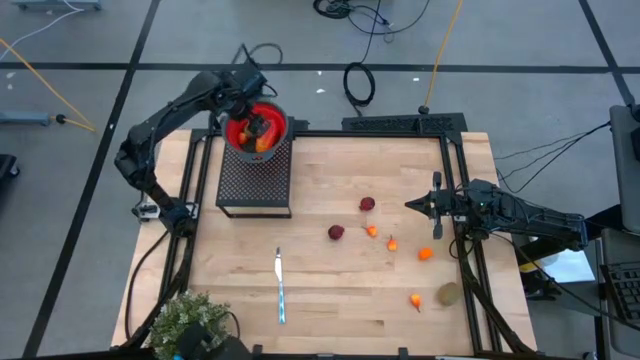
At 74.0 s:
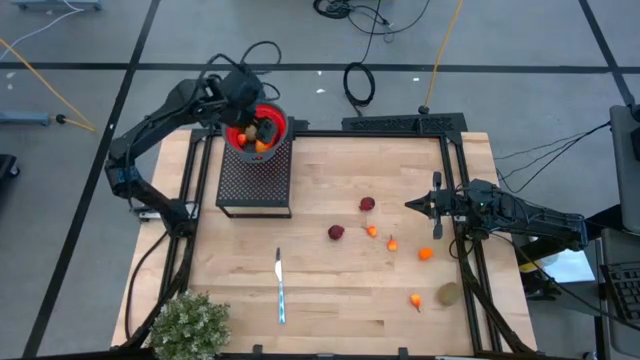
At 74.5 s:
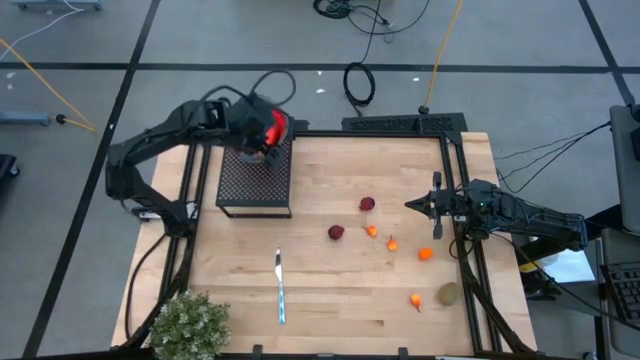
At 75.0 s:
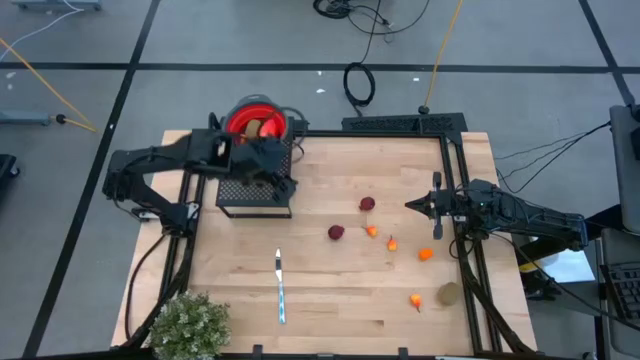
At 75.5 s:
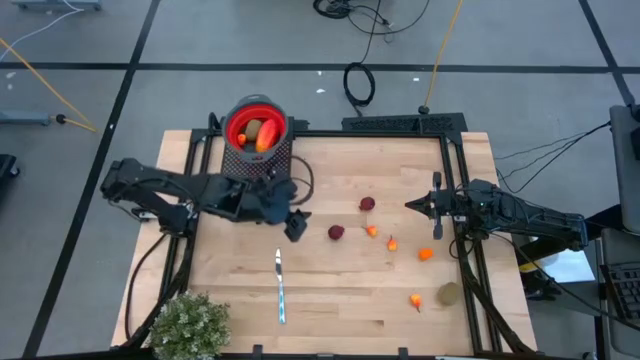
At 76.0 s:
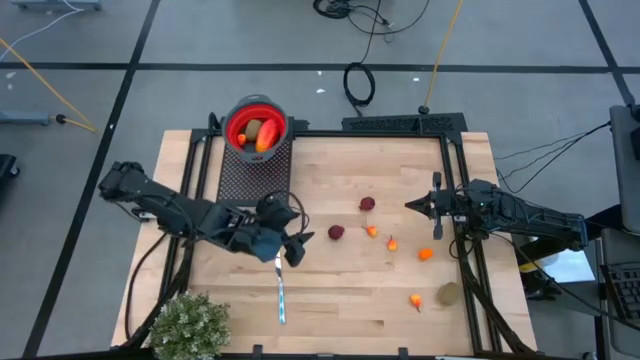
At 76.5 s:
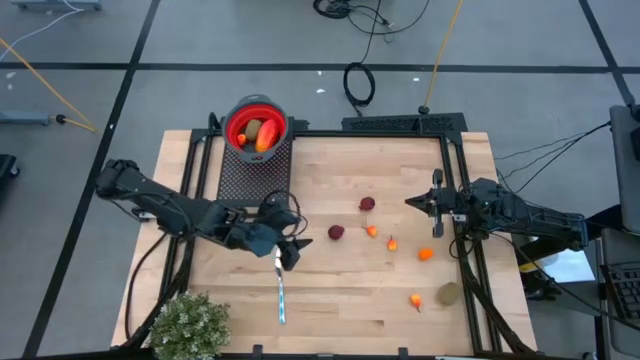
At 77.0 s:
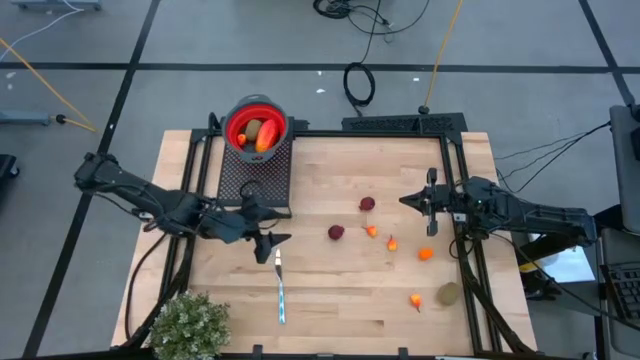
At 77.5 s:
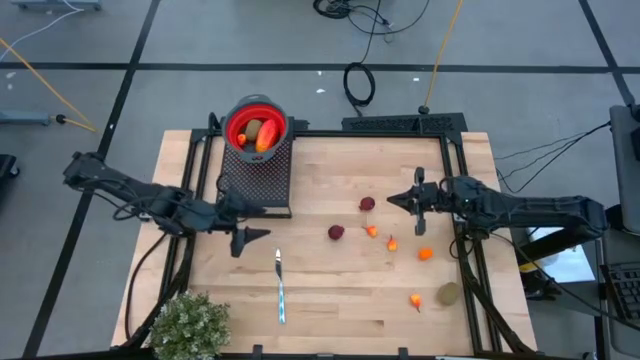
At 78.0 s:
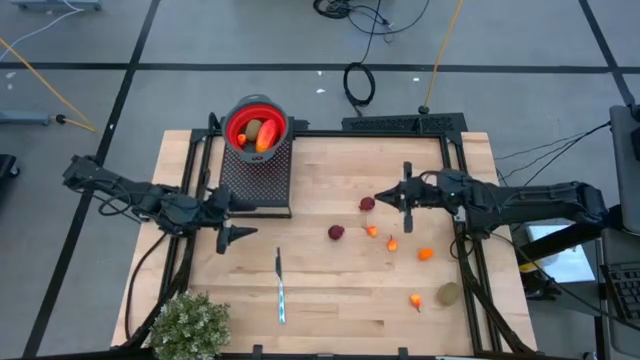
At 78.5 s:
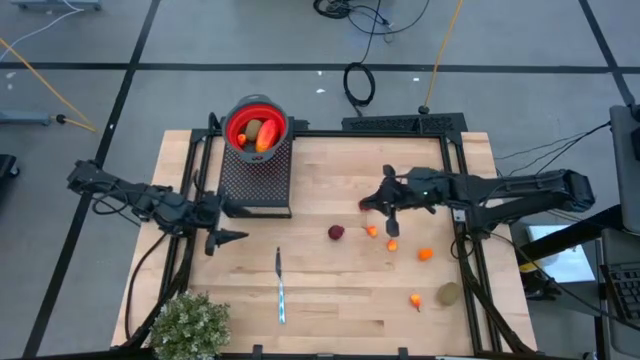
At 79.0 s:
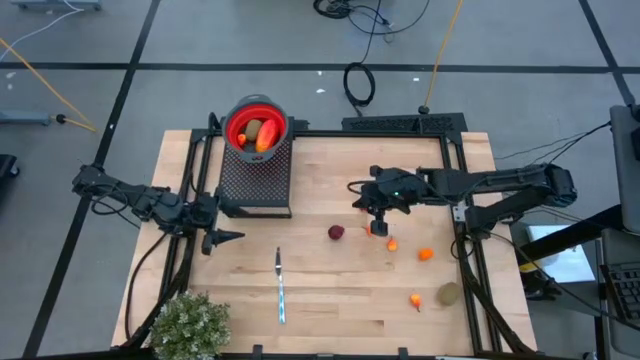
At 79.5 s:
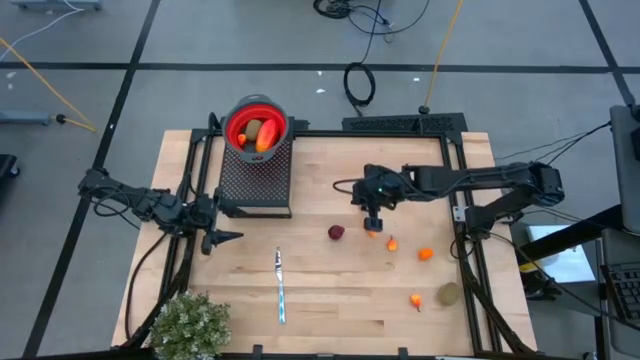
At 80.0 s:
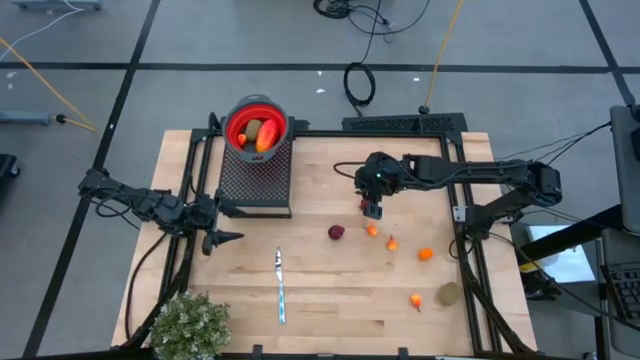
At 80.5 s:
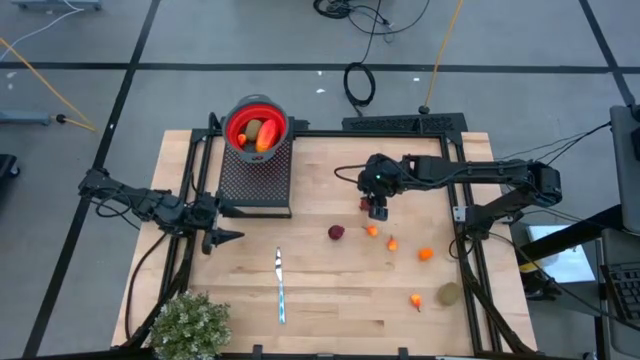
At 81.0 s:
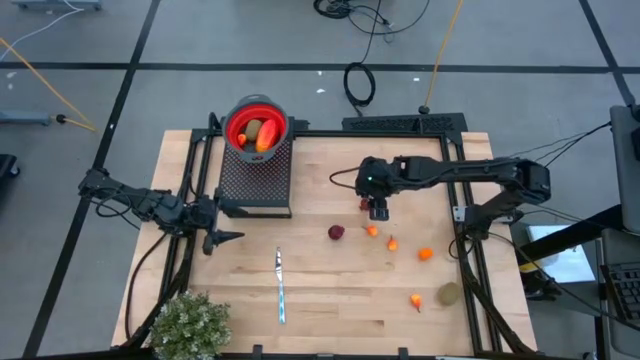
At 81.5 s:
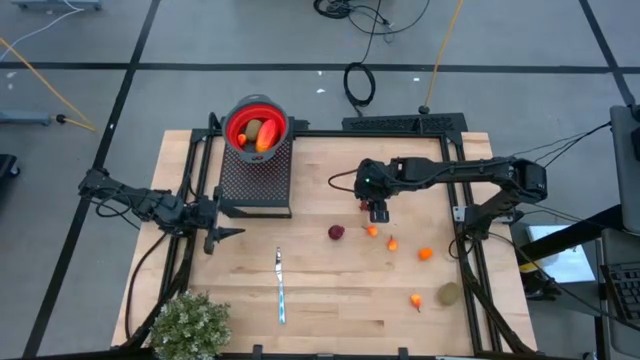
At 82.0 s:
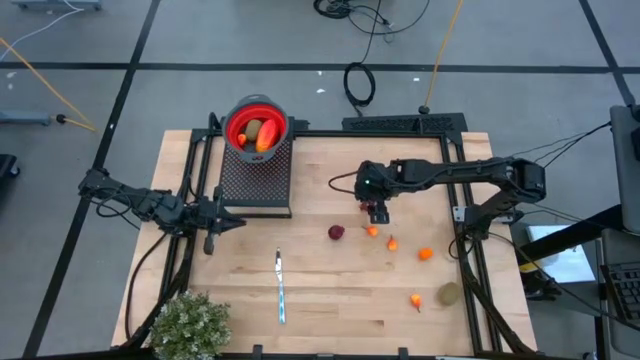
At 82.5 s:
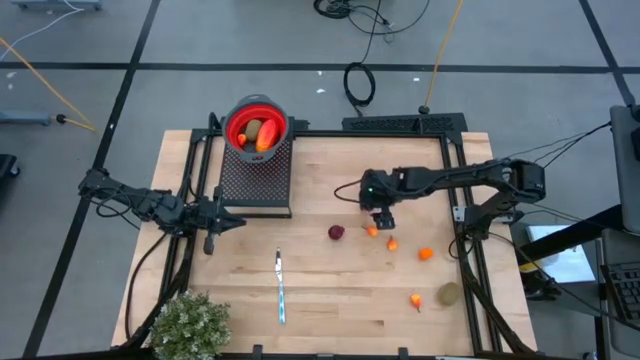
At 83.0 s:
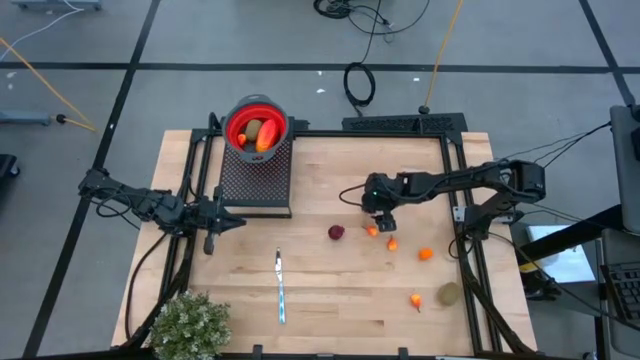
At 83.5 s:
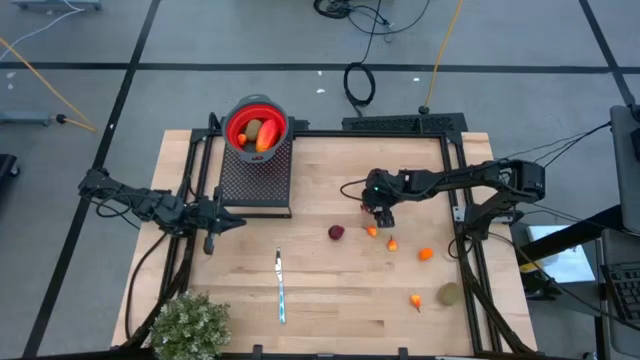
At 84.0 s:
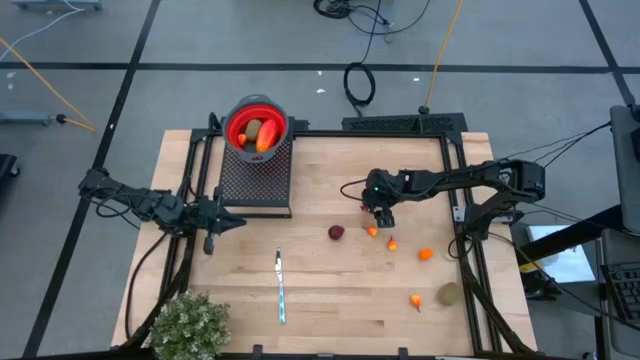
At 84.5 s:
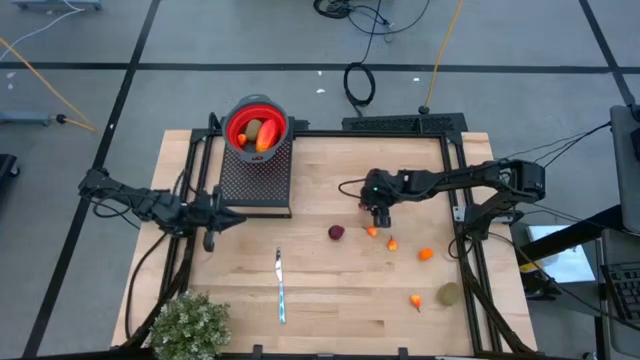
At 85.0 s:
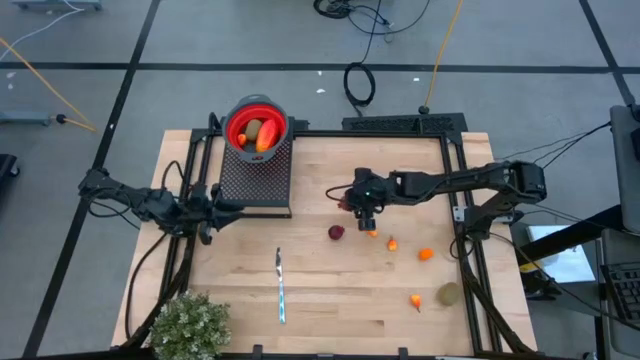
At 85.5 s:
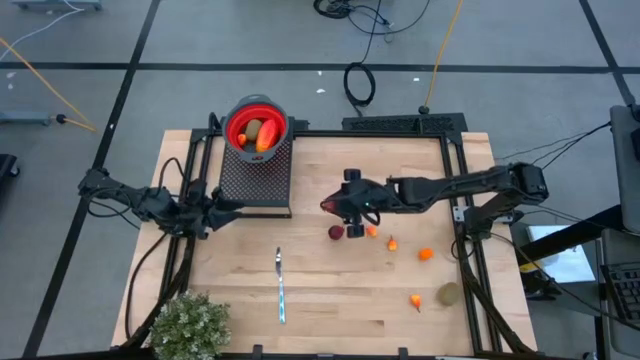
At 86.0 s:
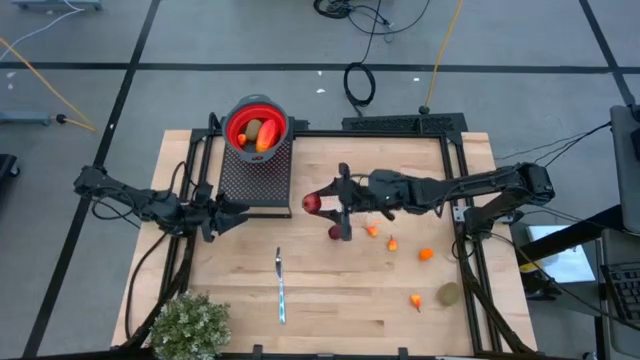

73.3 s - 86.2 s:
Task: Pick & Place Fruit
Put the pomegranate into the red strainer bowl on the shelf

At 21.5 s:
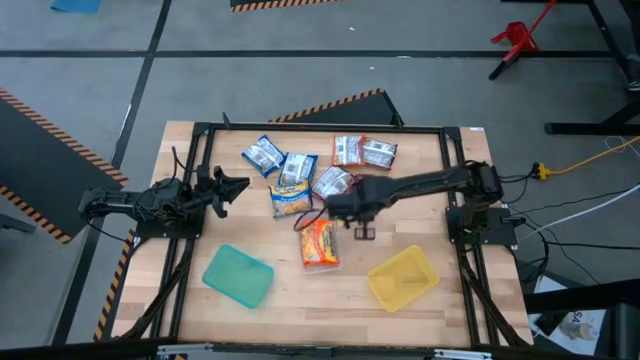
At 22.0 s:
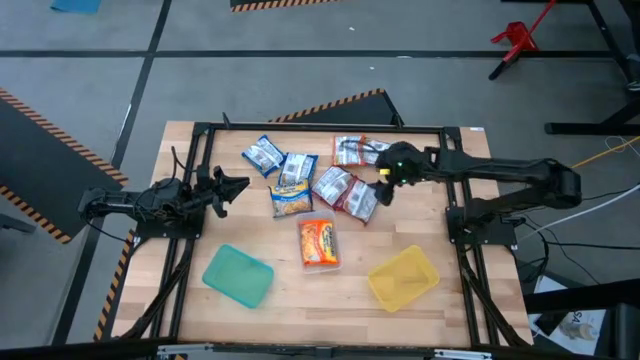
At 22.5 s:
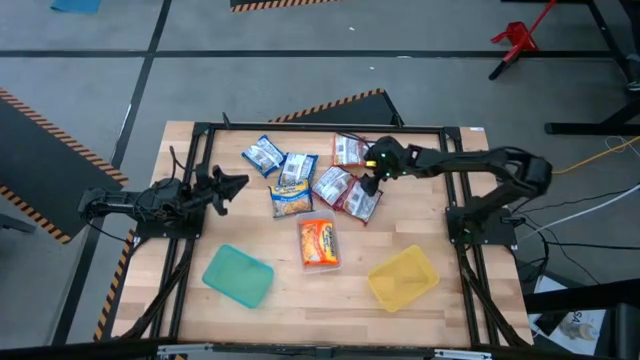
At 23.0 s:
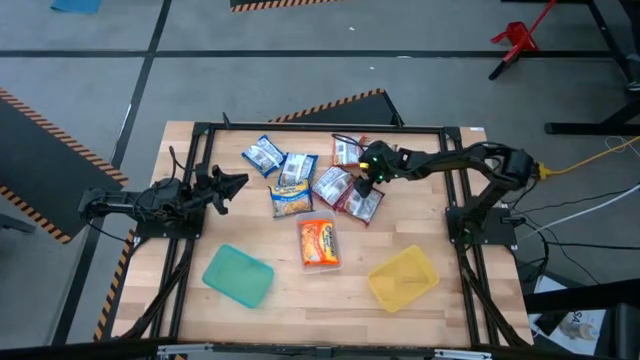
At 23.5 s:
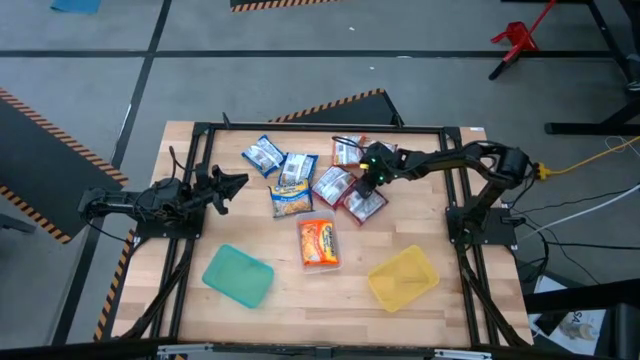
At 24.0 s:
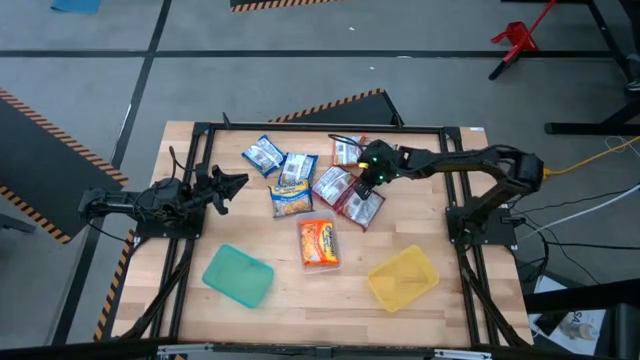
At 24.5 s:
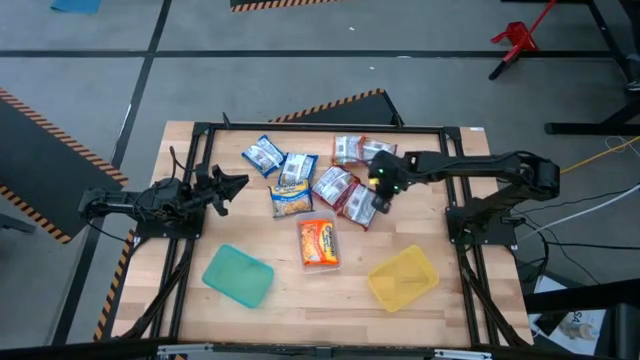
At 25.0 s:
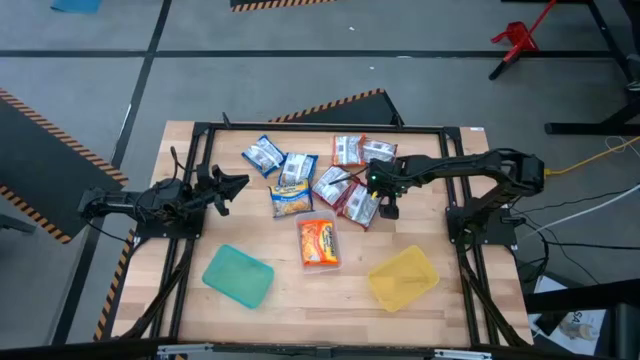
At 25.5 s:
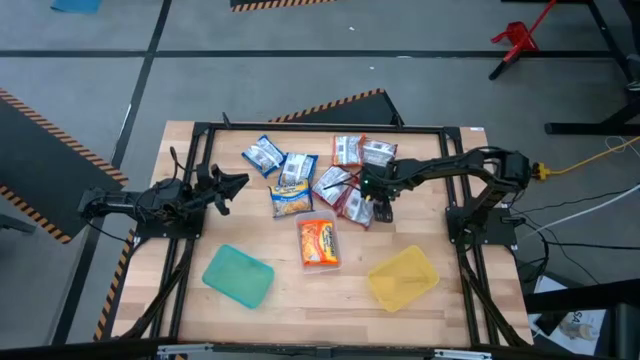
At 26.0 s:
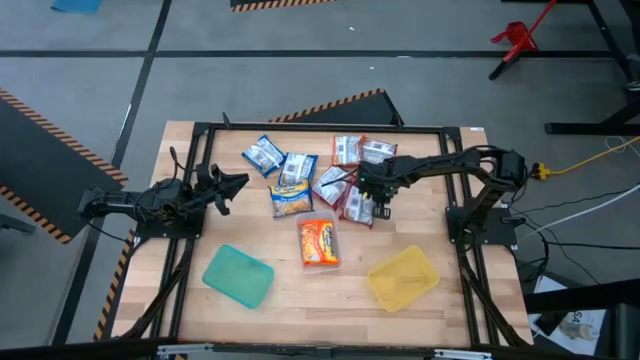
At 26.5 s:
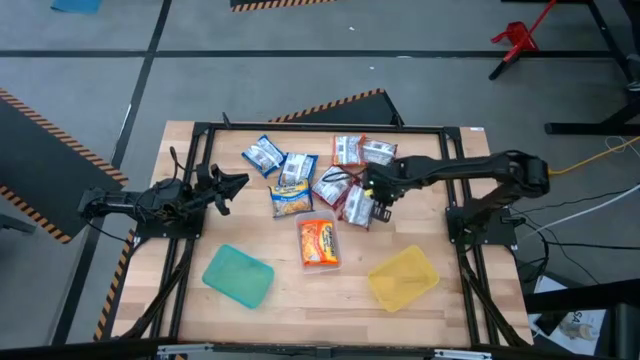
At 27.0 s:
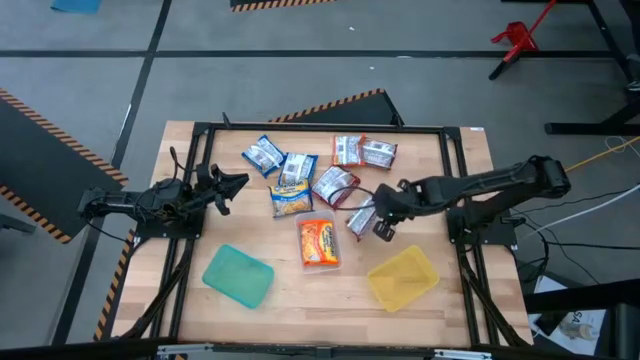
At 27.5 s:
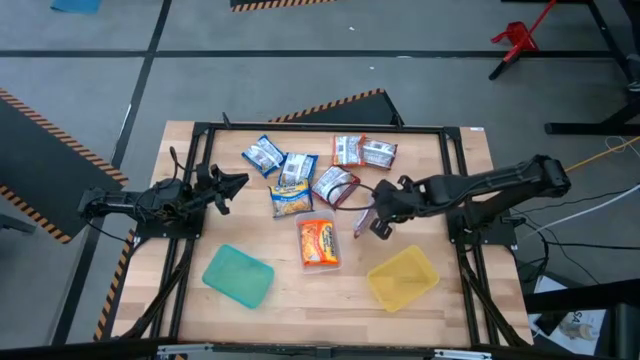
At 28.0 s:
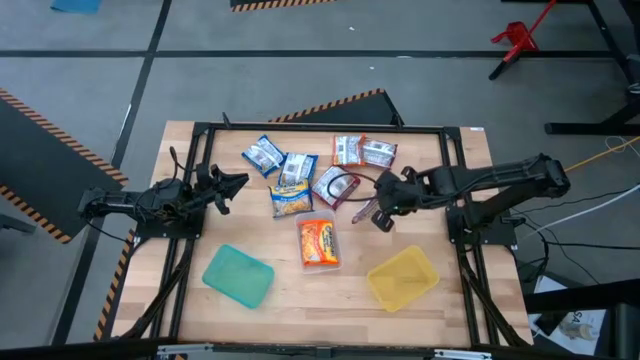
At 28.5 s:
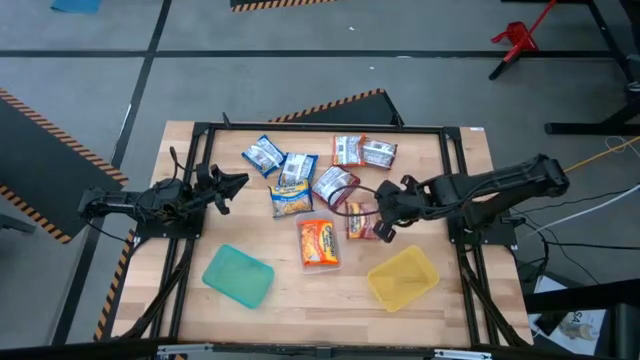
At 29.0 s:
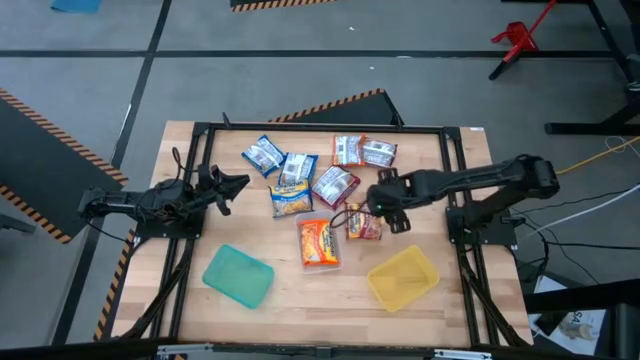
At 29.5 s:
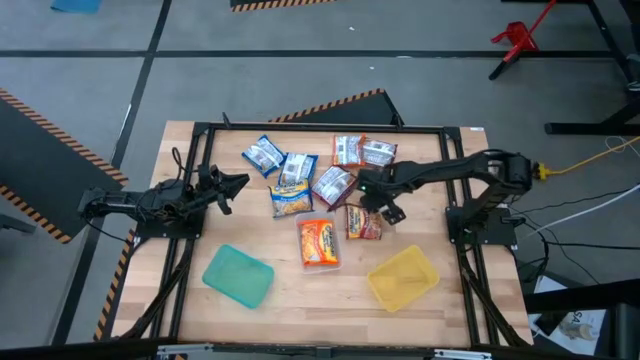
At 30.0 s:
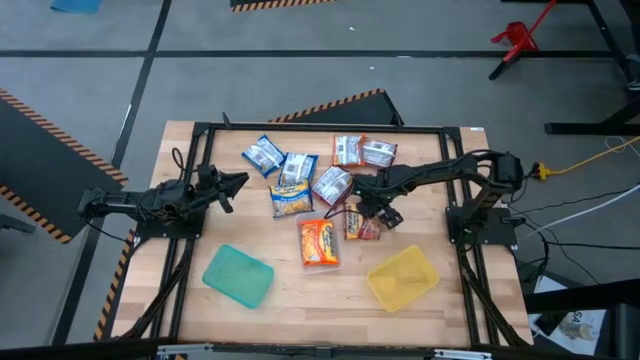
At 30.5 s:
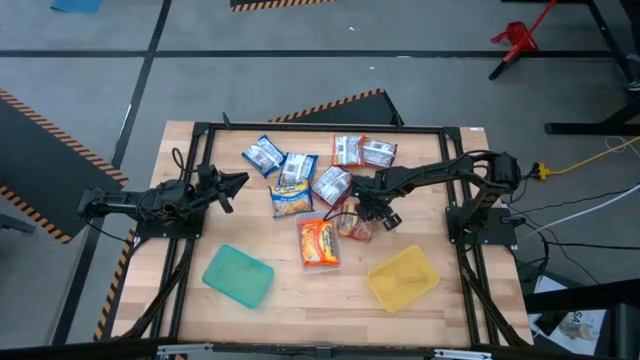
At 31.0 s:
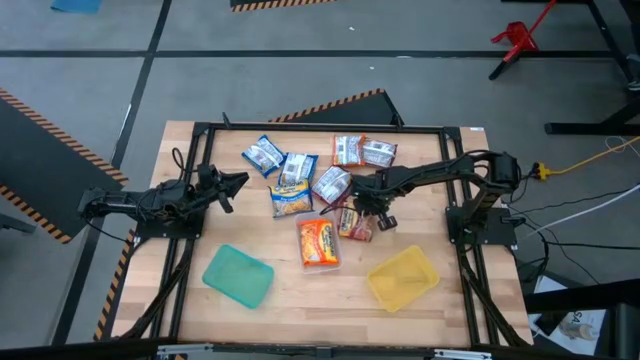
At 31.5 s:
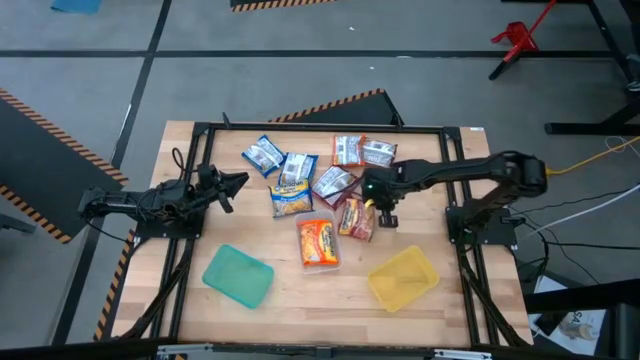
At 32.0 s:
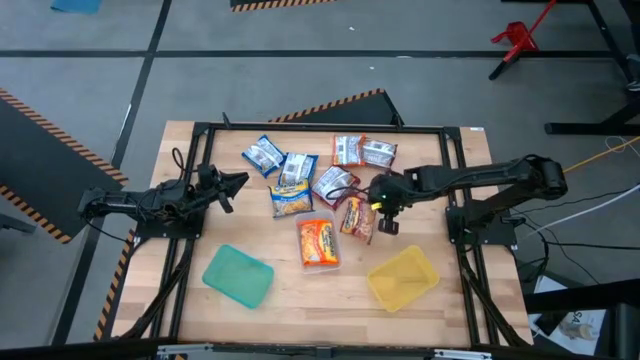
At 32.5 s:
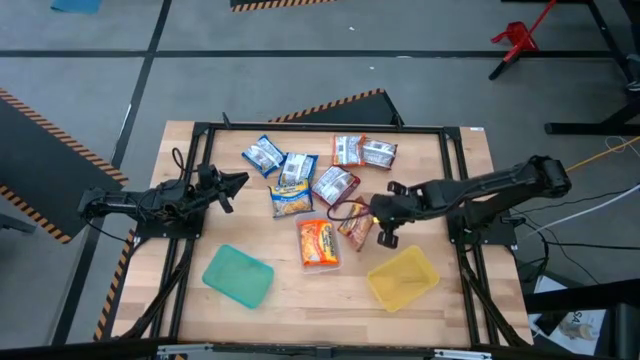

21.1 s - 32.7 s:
Task: Sort Maruchan noodles
Put the bottom right red noodle pack into the yellow bin
